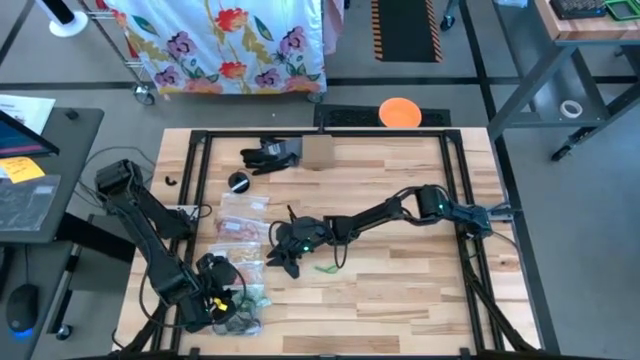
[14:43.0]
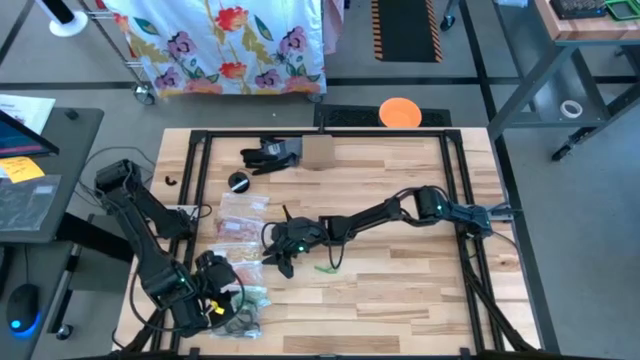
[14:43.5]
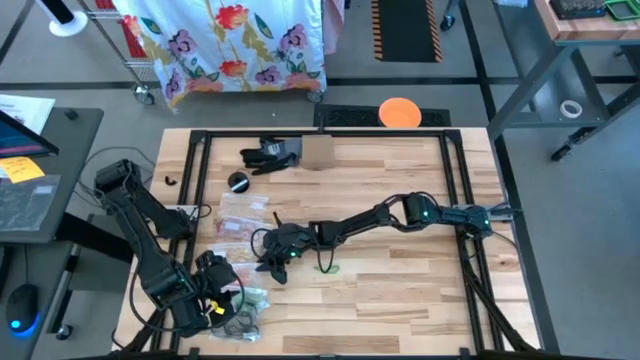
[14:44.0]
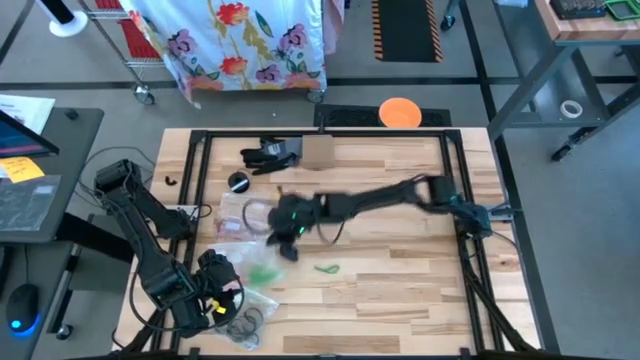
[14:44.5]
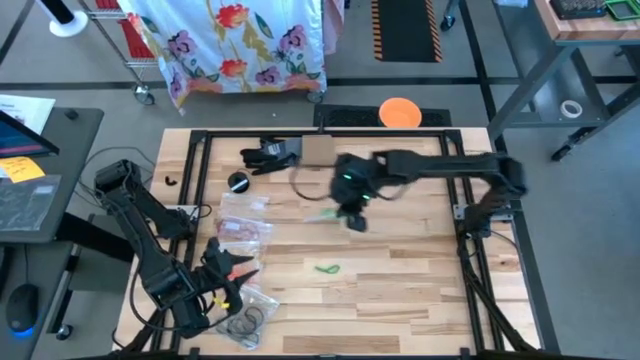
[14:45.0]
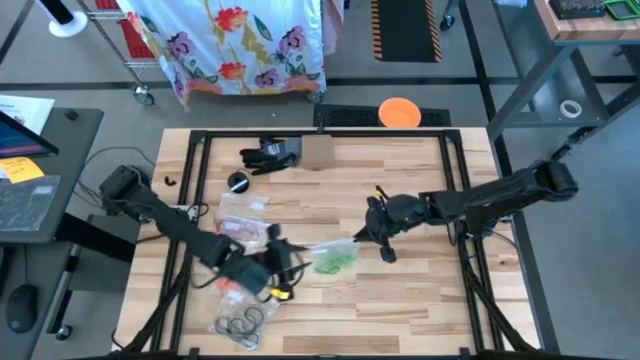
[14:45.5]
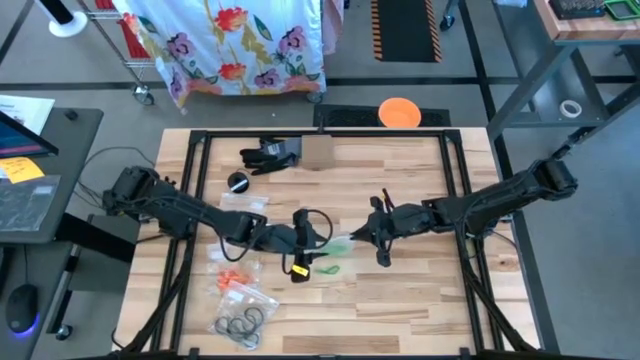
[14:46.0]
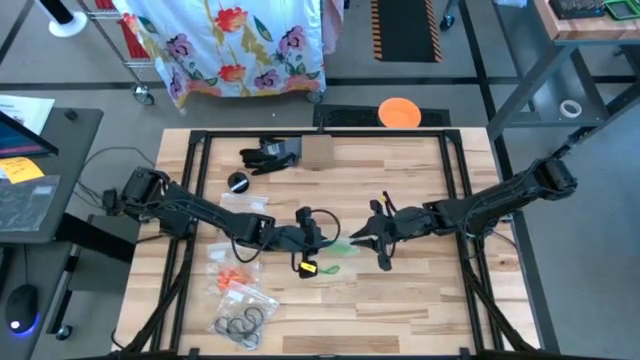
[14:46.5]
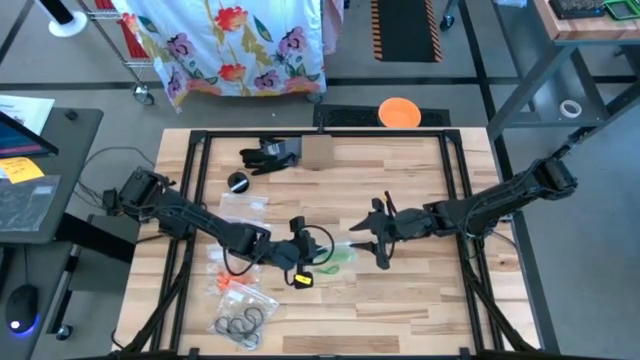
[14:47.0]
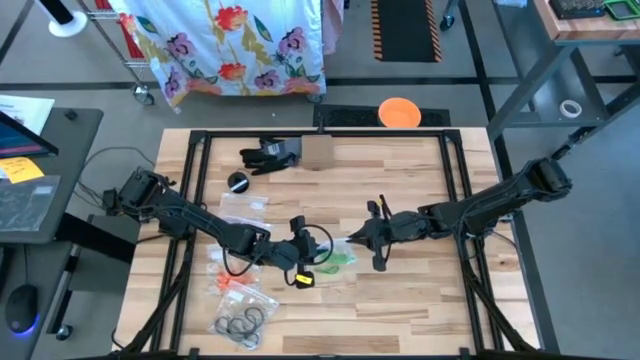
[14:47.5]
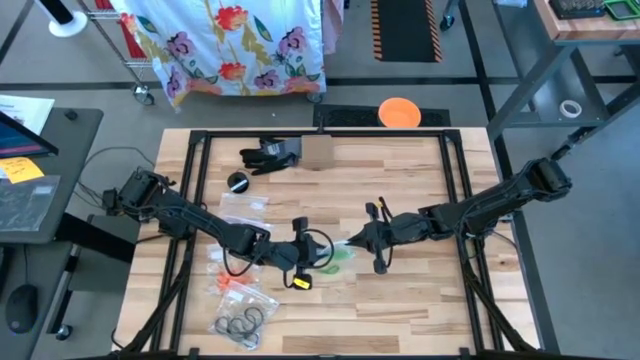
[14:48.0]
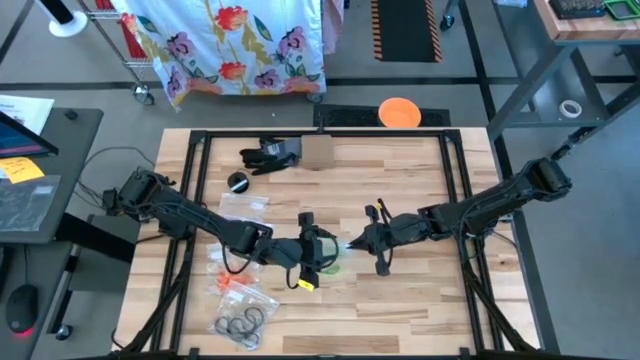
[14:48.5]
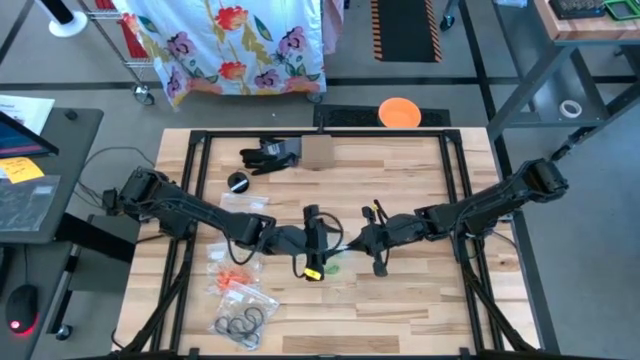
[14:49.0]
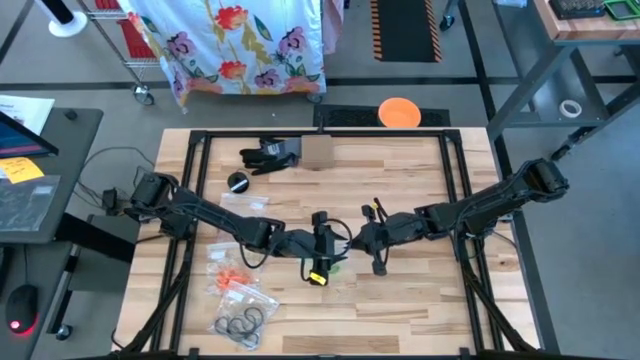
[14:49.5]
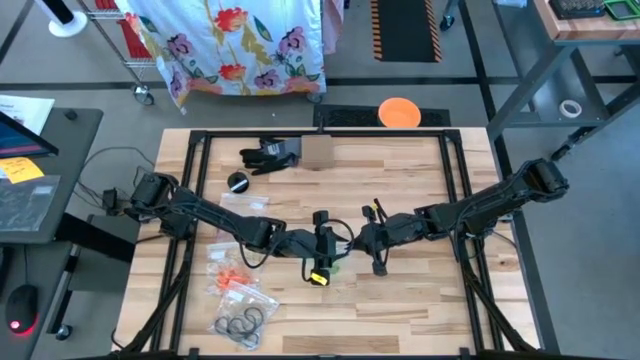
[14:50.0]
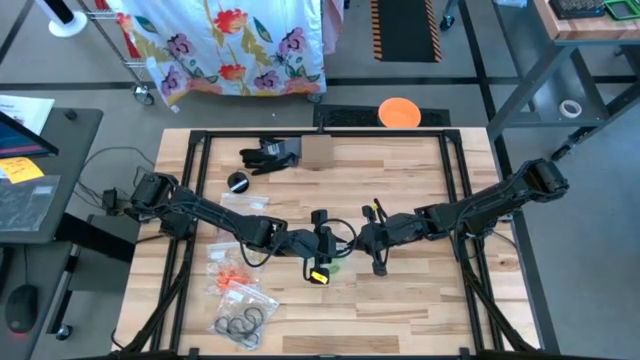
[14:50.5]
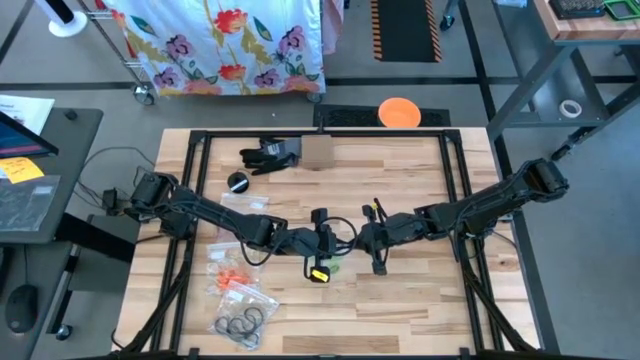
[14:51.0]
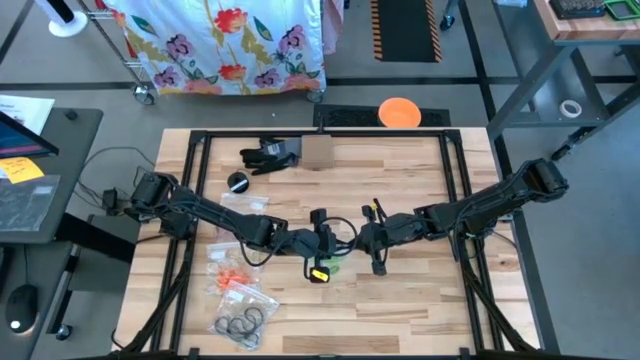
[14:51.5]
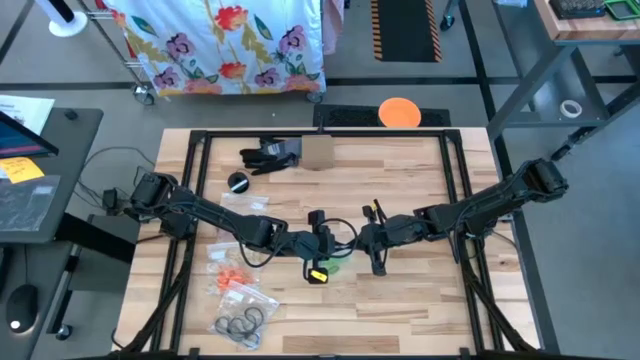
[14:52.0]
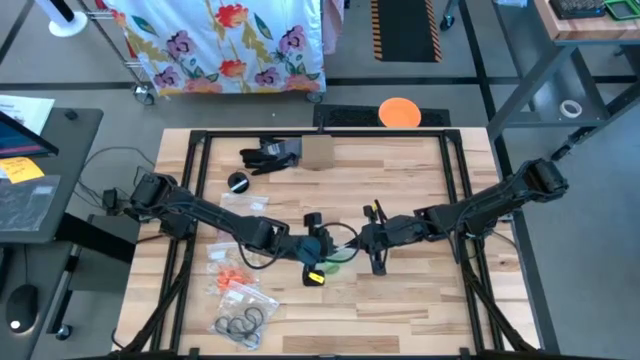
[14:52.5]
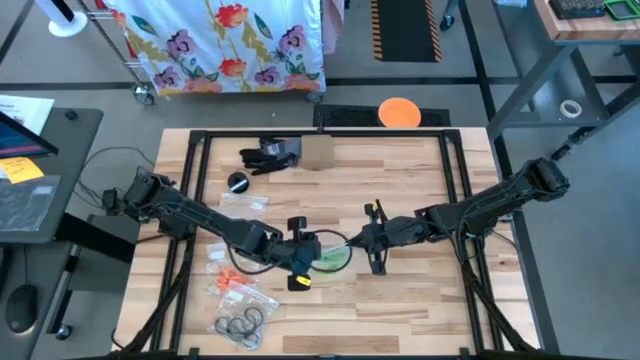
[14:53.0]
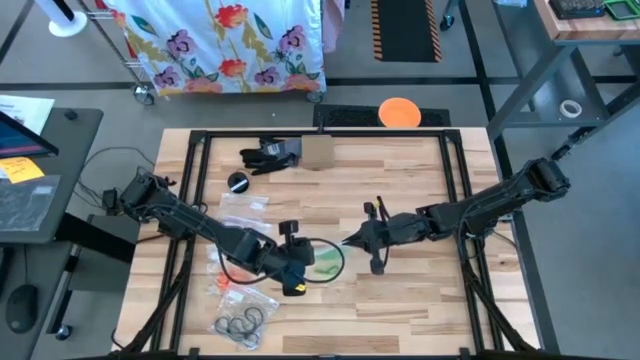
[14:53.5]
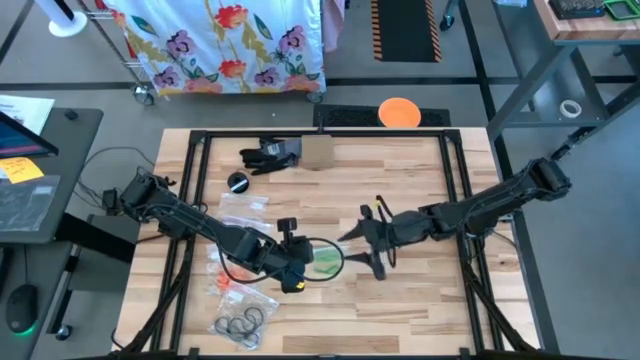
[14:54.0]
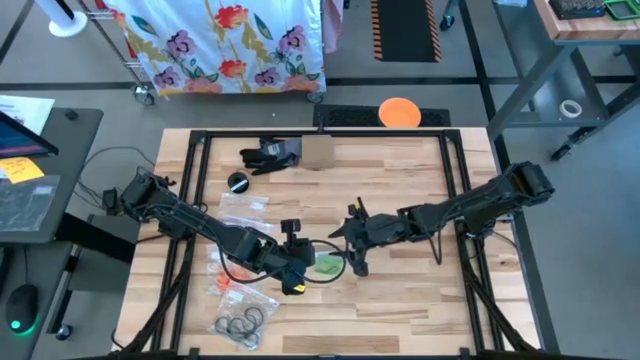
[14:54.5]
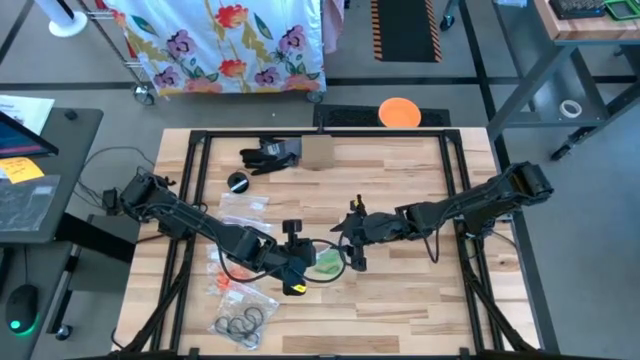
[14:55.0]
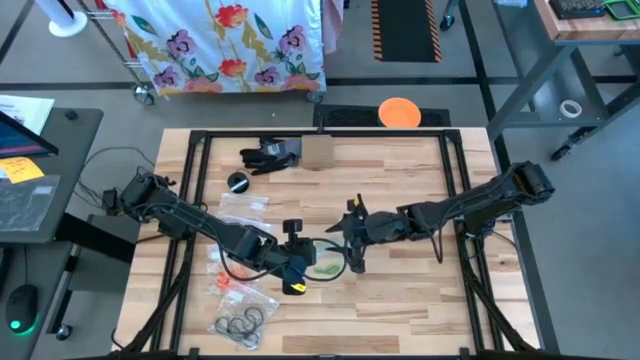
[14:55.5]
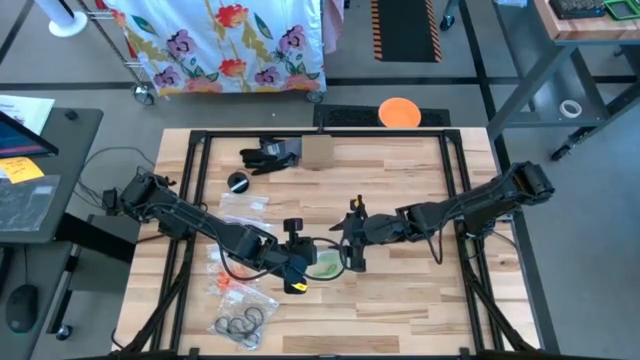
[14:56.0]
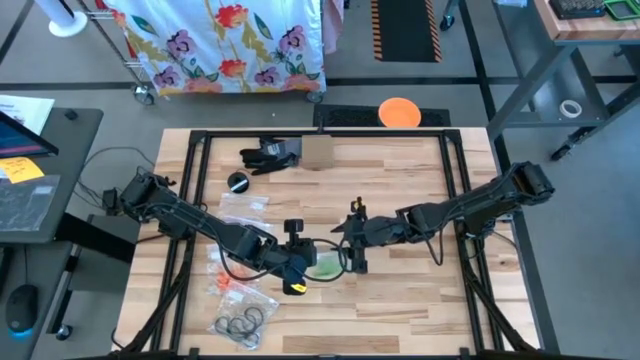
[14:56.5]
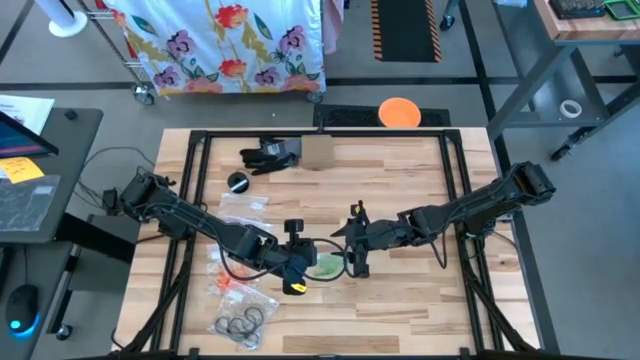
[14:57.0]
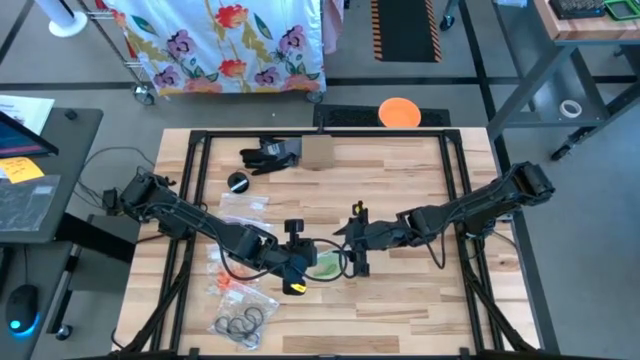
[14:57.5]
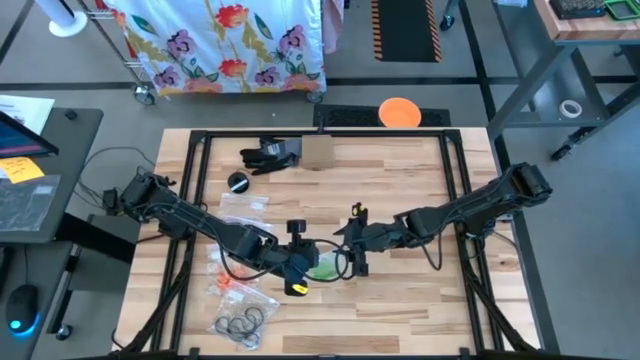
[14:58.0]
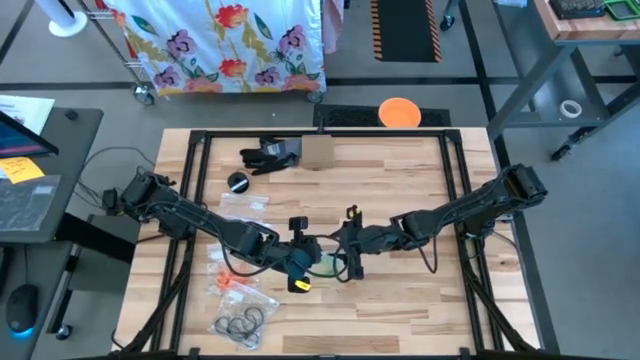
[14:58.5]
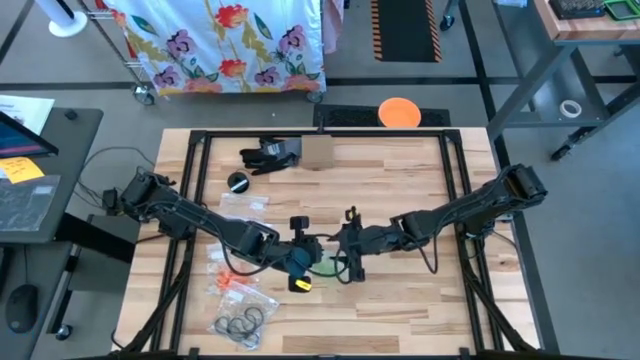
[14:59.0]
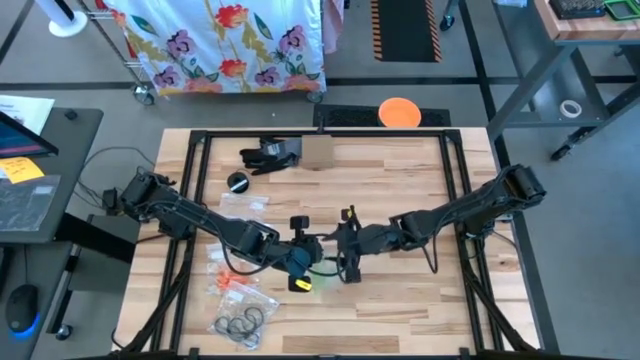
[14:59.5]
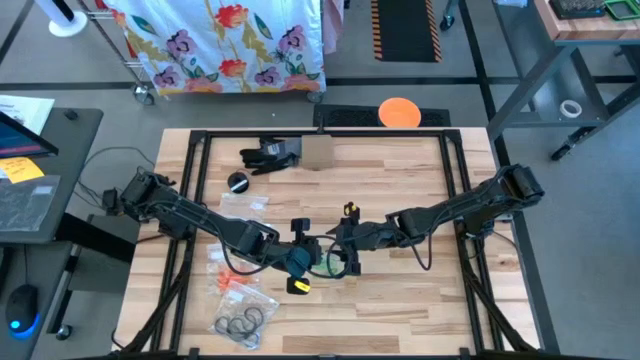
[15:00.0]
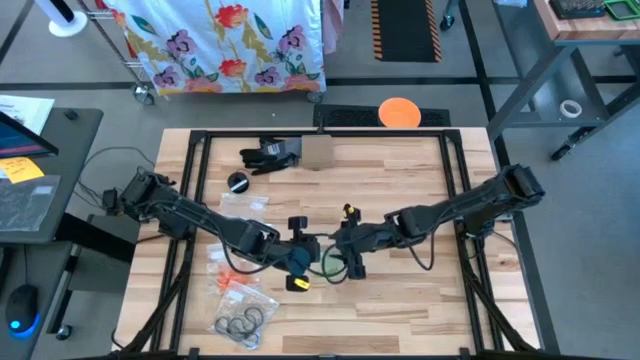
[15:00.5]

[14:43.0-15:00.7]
Task: Sort rubber bands
Open the transparent zip bag

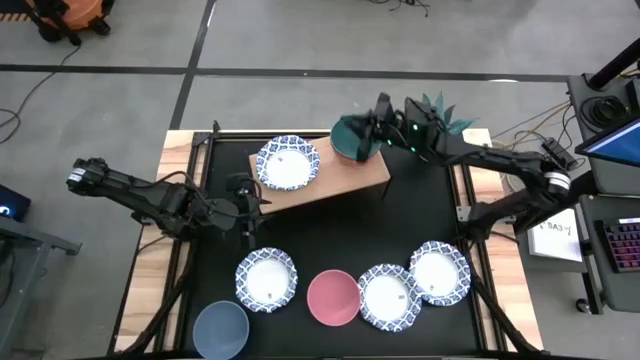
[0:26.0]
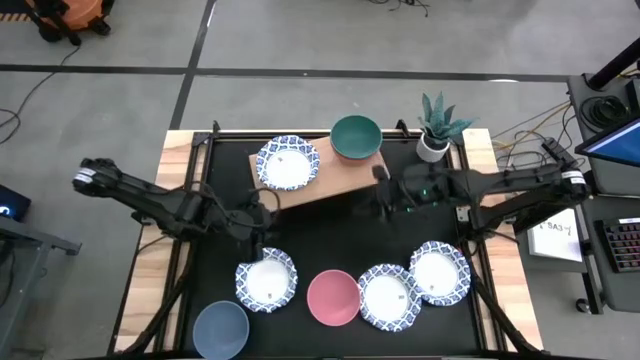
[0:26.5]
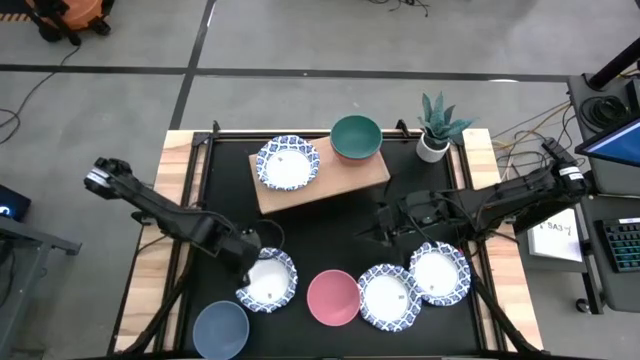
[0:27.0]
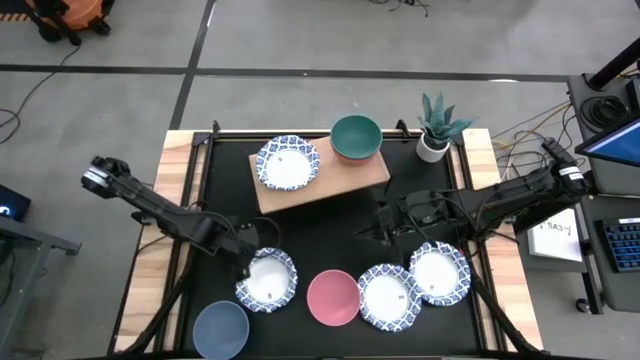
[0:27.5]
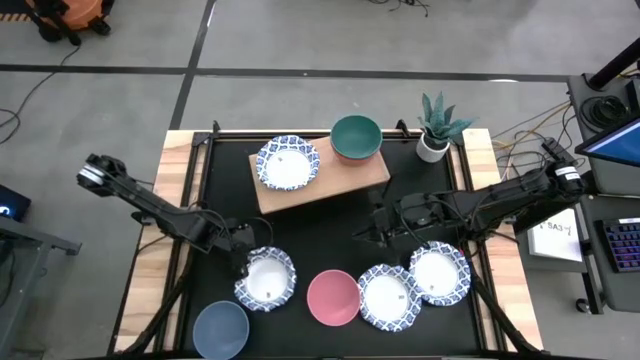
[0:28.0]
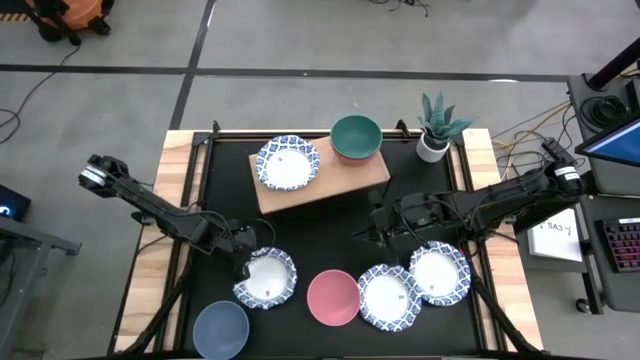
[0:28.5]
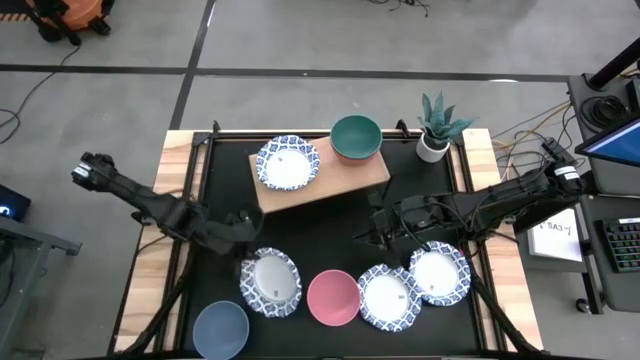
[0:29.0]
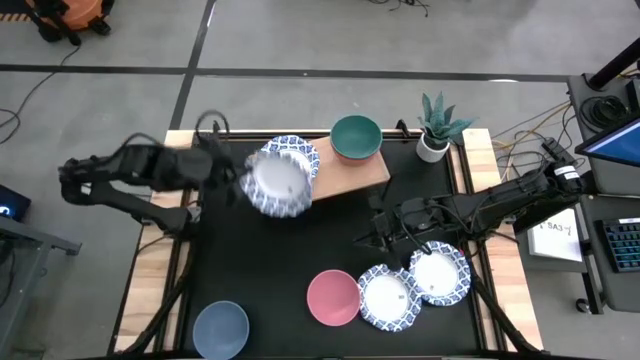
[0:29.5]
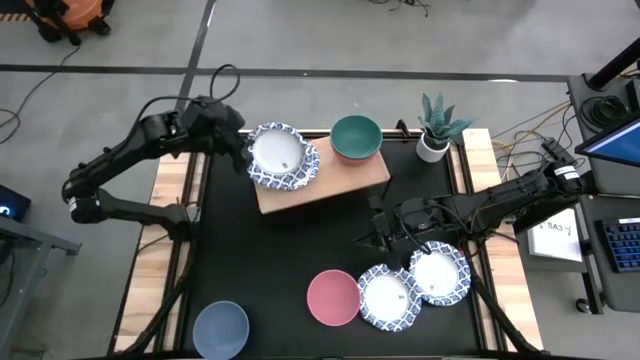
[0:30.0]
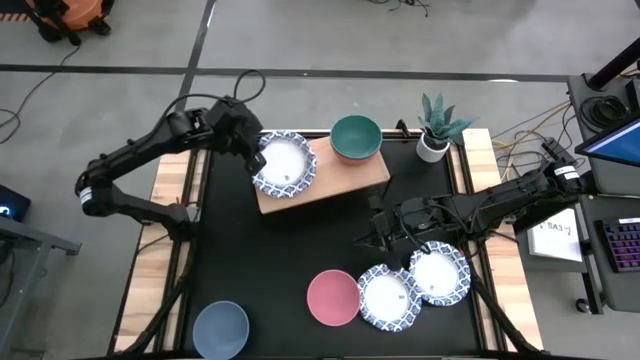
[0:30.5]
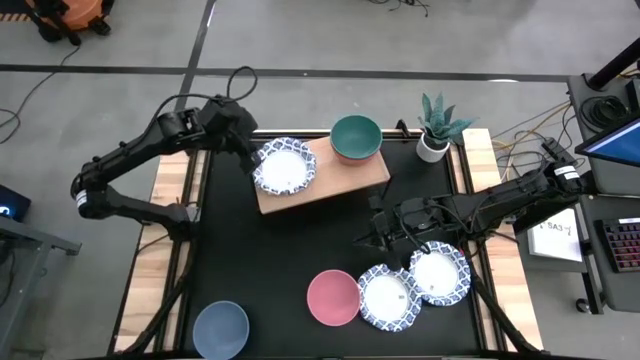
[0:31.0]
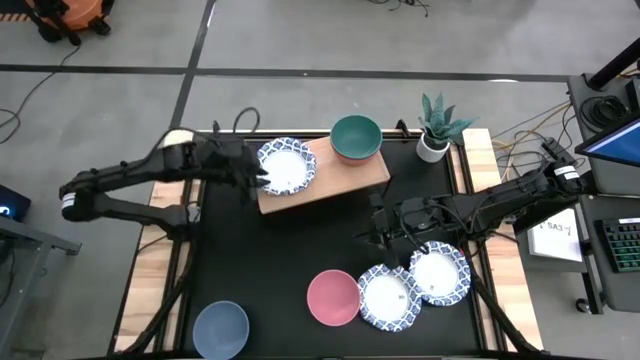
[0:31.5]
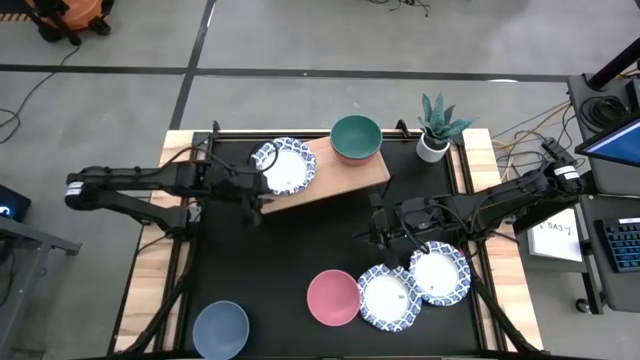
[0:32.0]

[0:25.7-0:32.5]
Task: Place and stack bowls onto a shelf
Stack the top left white and blue bowl on top of the white and blue bowl
